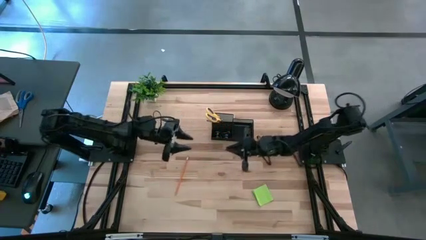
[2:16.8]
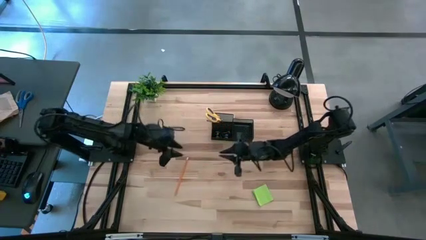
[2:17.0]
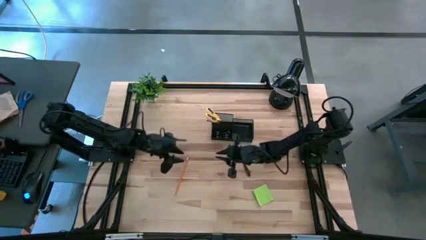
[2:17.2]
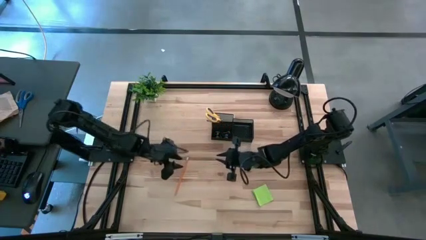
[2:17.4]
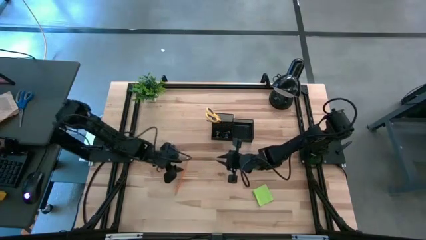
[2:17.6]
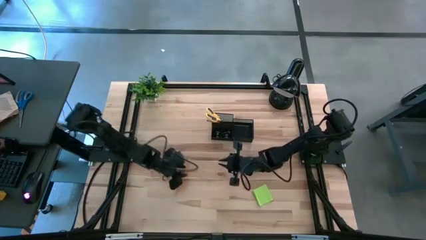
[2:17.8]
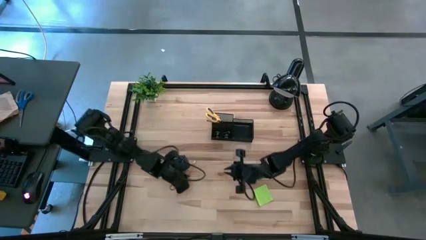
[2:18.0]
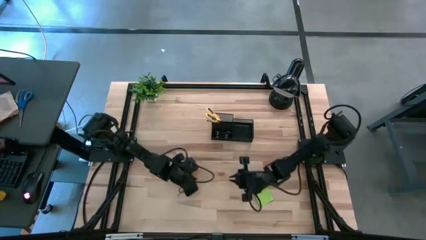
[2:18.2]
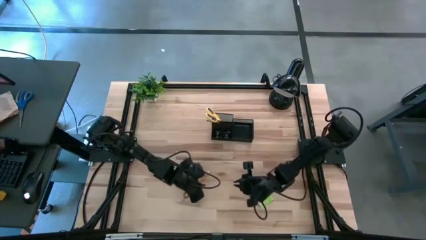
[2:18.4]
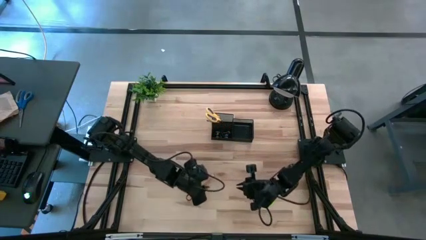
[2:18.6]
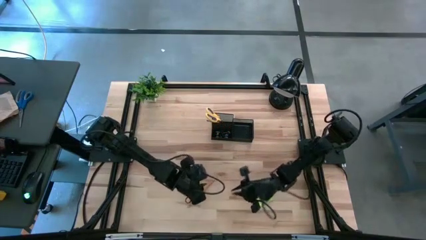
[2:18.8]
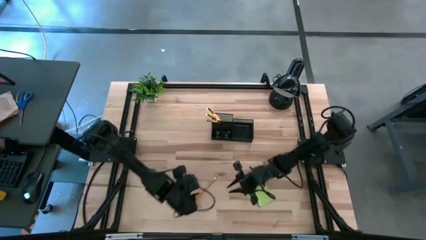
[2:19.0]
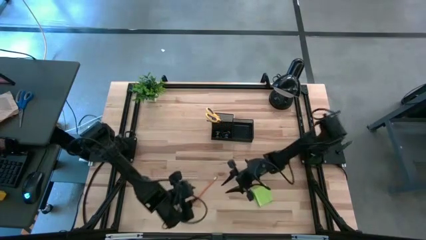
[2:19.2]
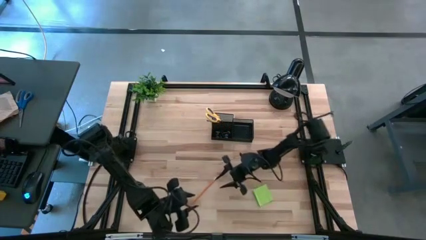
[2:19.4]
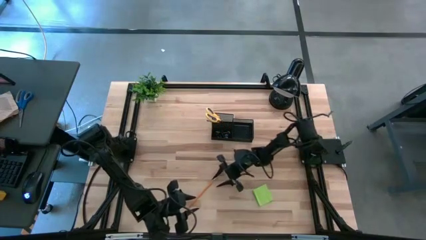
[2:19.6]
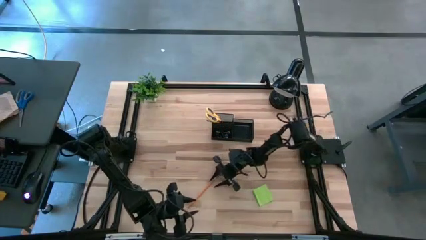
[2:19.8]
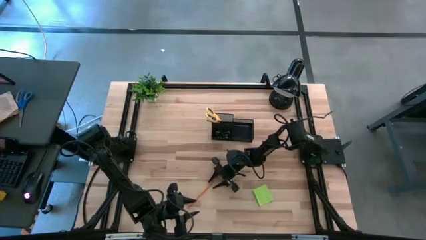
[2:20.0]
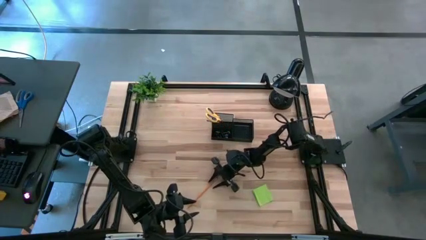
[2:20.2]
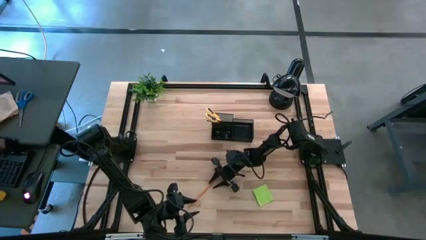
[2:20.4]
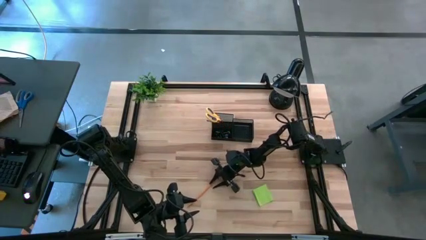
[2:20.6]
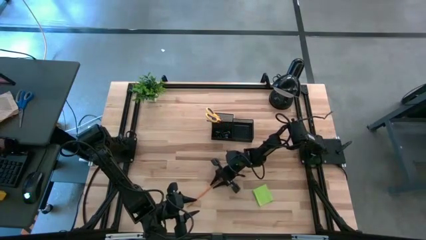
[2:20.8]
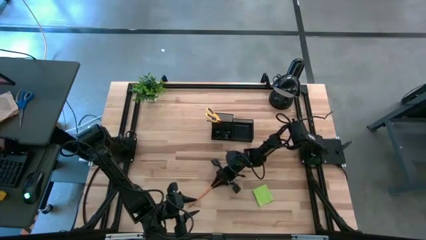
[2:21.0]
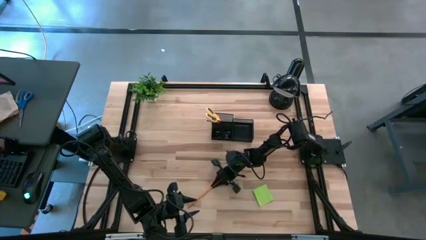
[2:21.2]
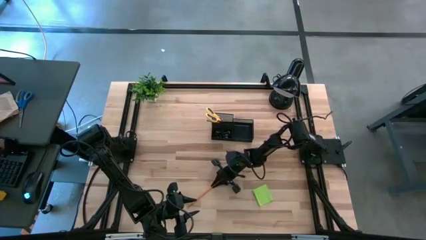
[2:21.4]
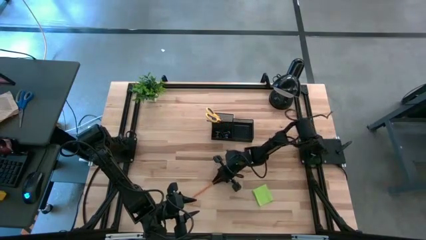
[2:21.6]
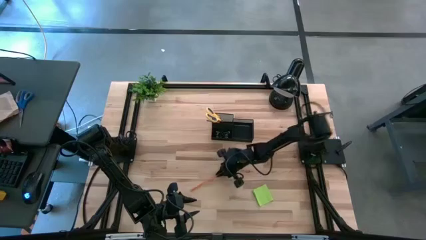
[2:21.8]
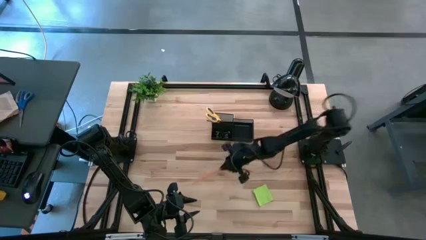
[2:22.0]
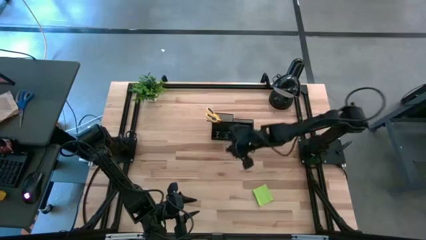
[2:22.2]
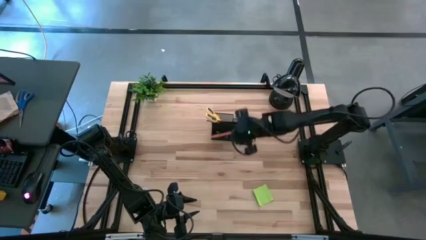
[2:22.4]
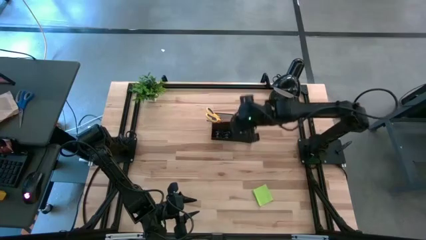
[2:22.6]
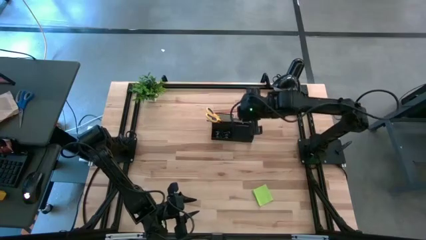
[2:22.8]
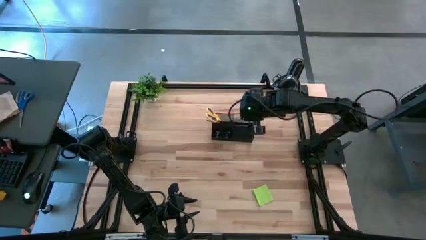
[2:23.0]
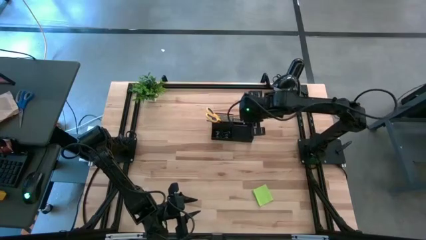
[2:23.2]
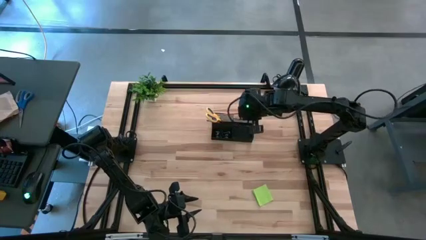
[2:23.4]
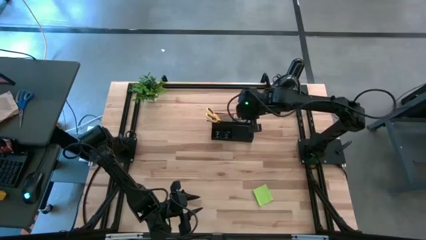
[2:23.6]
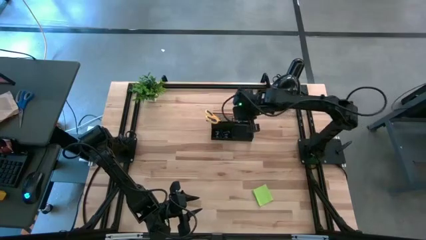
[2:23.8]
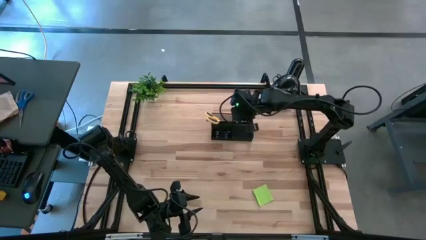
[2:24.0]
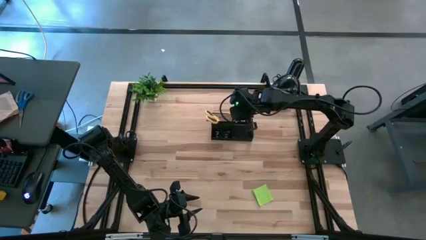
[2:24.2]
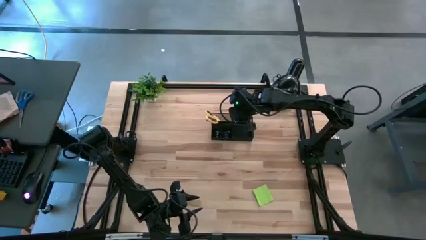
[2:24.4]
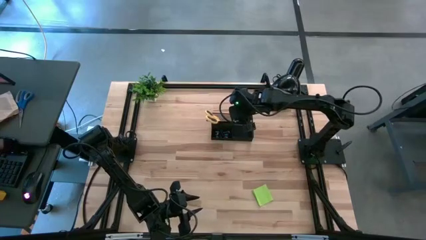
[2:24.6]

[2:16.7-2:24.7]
Task: Pick and place office supplies into organizer
Put the orange pencil into the desk organizer

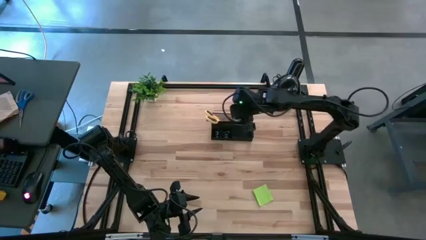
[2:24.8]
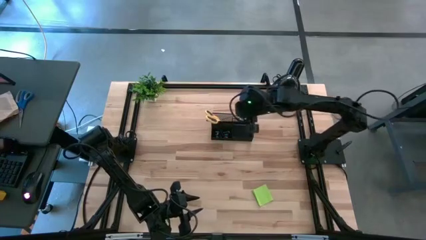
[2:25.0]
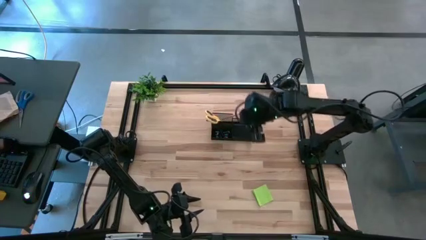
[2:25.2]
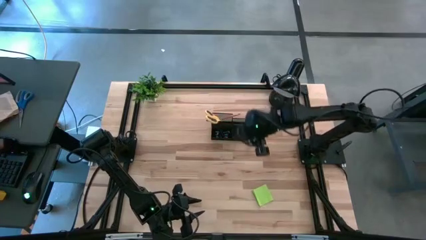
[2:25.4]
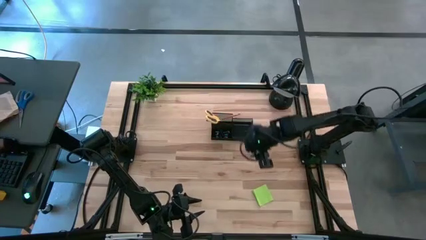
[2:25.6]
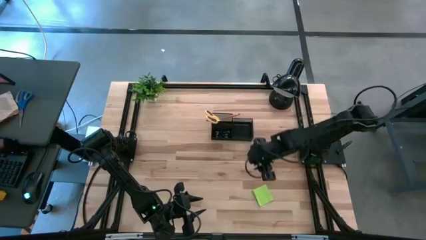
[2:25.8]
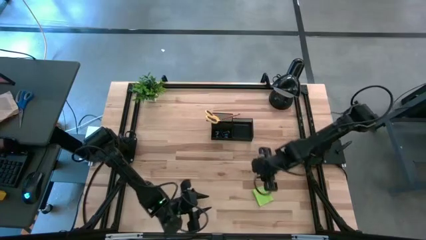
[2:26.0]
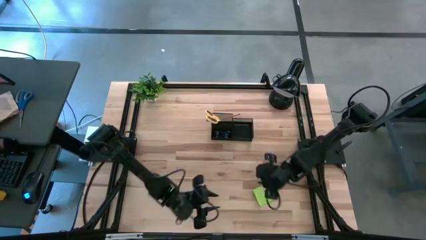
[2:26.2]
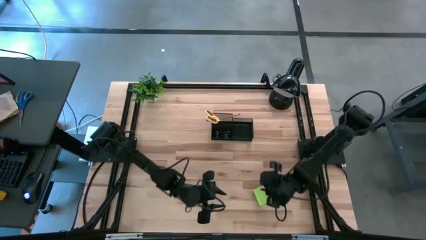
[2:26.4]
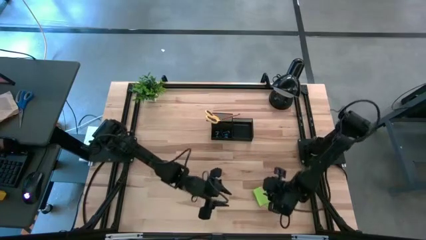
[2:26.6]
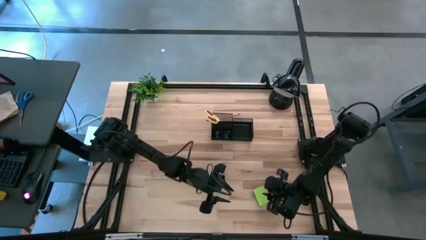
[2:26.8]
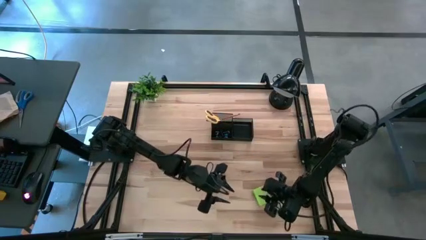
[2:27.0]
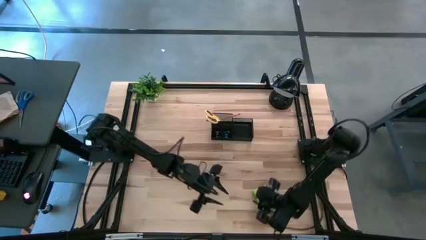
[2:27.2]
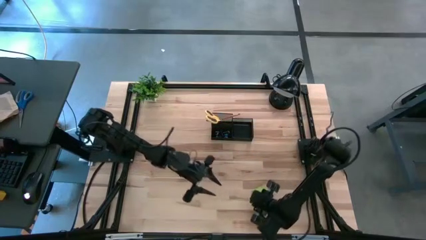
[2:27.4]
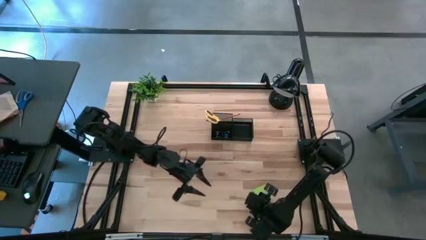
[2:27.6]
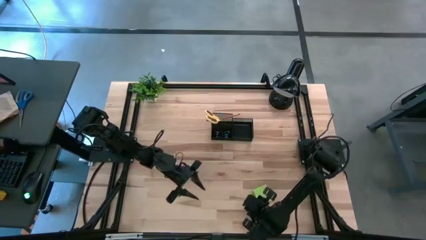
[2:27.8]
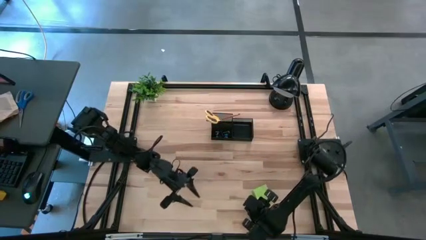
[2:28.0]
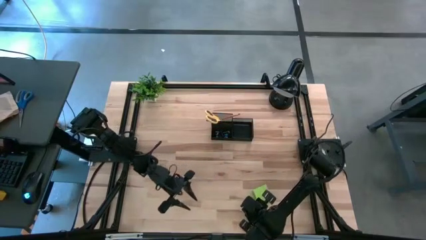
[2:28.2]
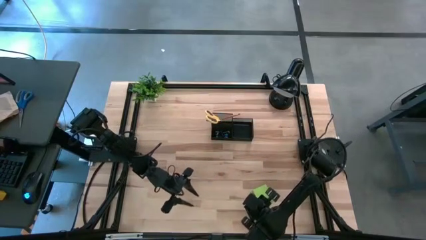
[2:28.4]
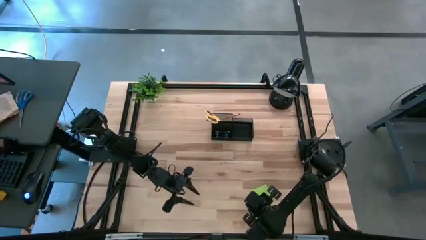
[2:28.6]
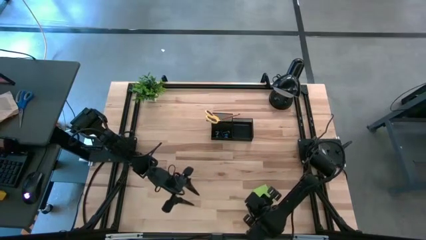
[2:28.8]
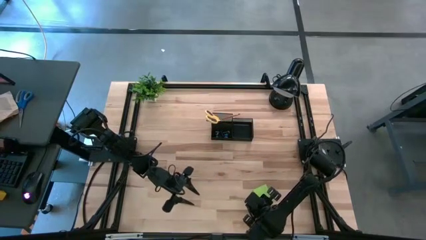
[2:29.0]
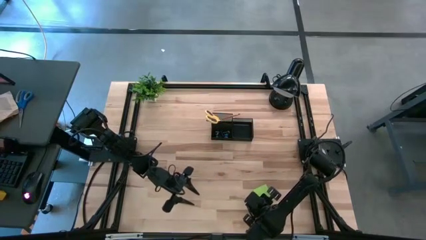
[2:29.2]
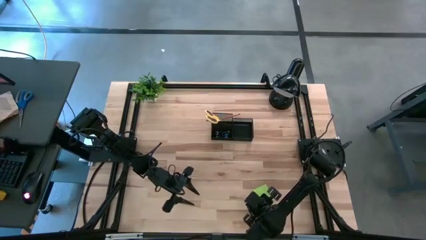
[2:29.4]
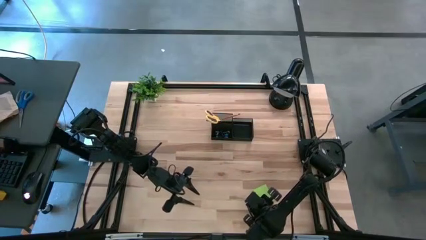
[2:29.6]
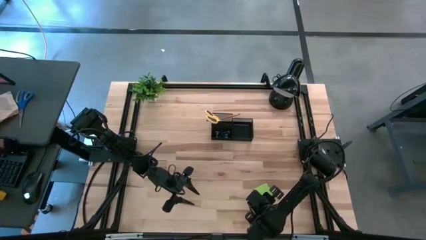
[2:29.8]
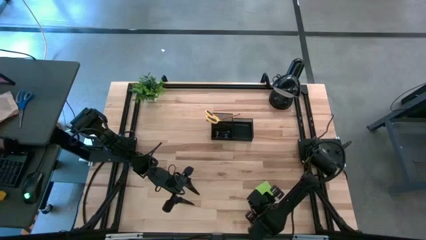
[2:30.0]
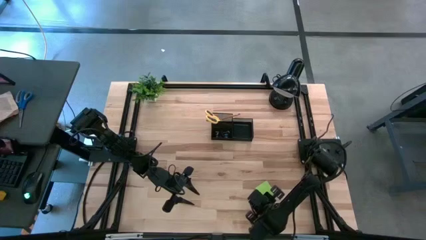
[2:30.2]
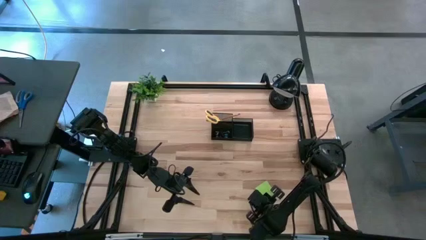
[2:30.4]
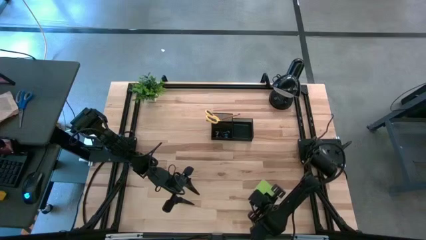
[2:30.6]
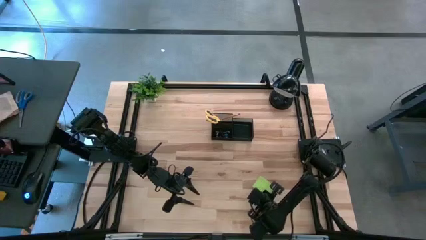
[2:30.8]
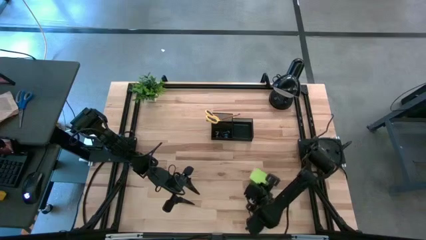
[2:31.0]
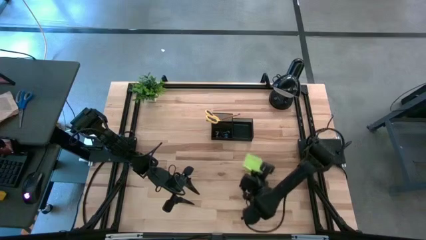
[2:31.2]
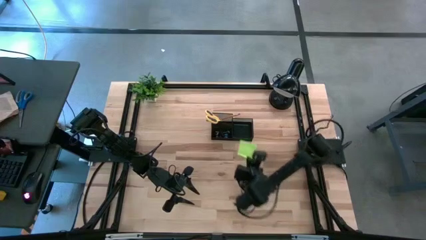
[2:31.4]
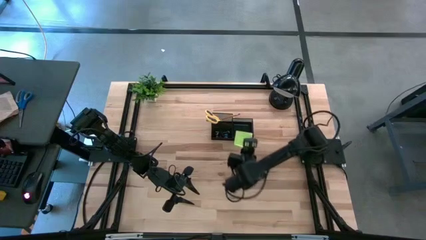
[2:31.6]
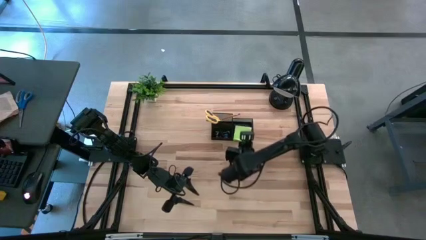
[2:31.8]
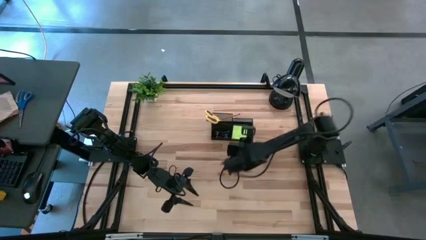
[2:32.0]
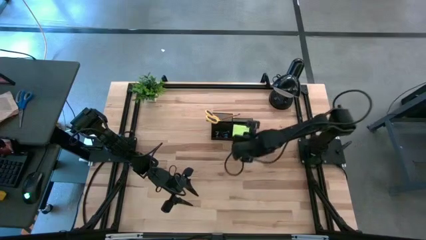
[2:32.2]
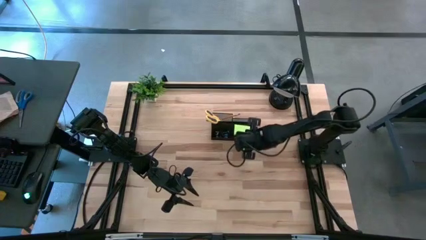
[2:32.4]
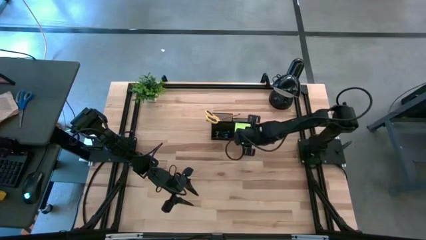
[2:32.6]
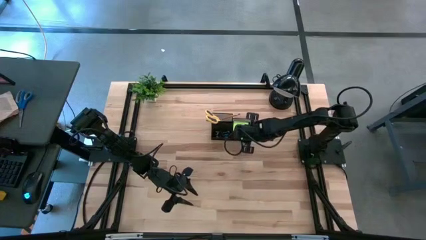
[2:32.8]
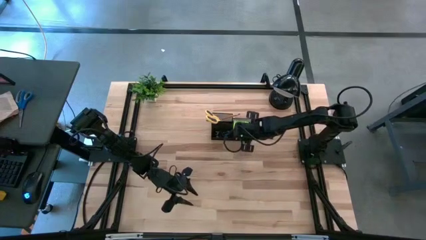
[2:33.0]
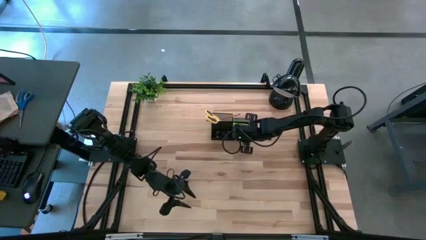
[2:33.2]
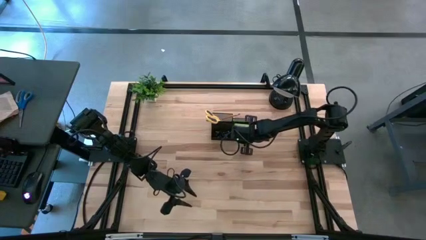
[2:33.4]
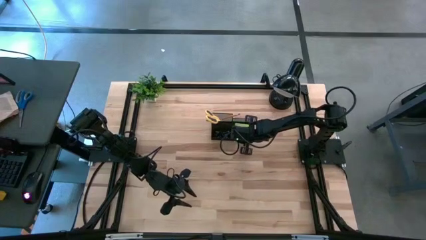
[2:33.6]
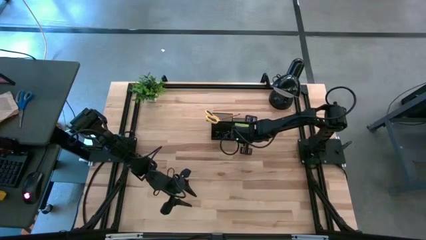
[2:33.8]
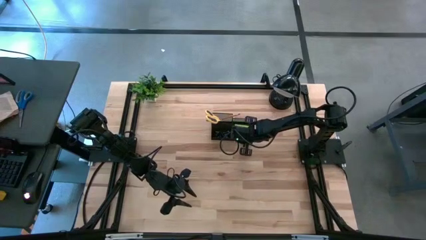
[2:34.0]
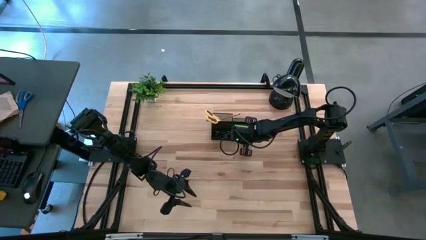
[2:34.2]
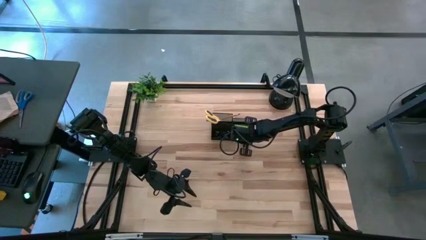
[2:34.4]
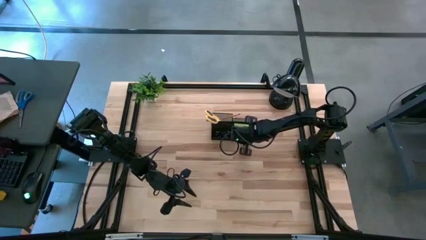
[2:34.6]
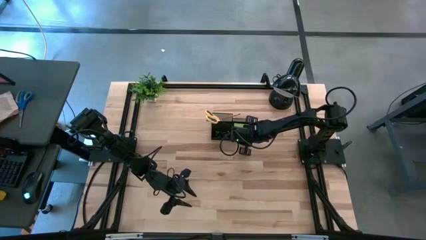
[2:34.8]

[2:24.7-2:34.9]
Put the green sticky note into the desk organizer
